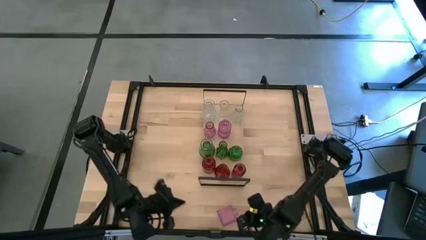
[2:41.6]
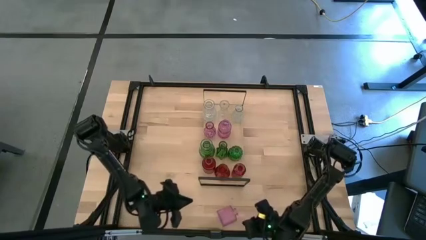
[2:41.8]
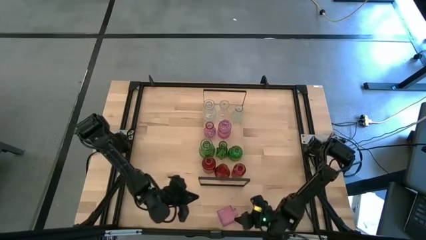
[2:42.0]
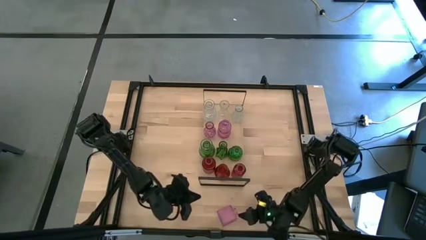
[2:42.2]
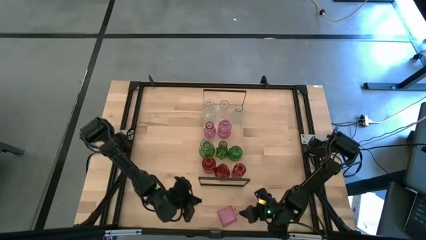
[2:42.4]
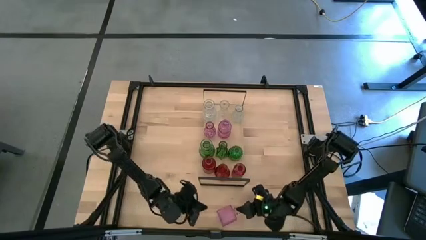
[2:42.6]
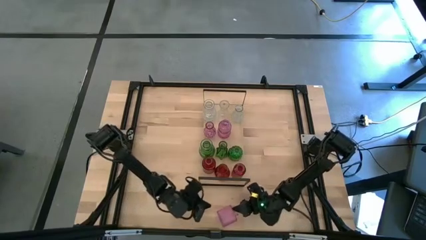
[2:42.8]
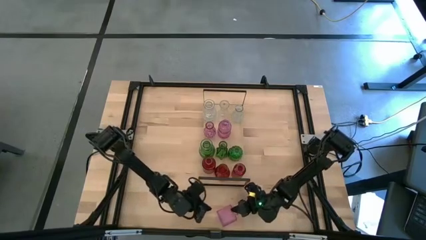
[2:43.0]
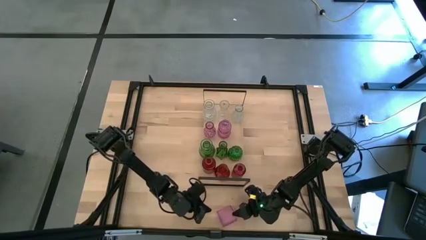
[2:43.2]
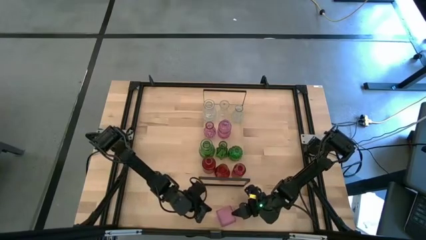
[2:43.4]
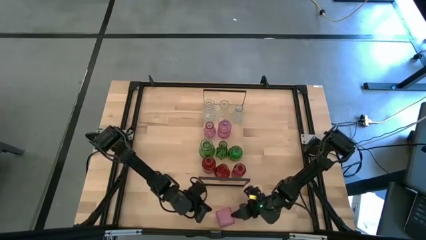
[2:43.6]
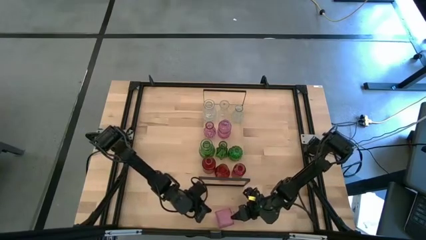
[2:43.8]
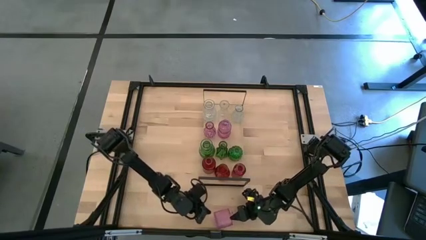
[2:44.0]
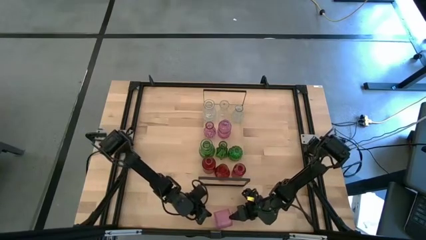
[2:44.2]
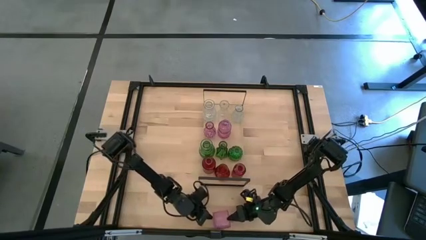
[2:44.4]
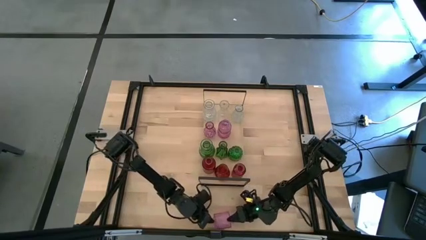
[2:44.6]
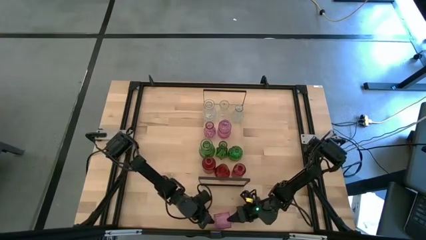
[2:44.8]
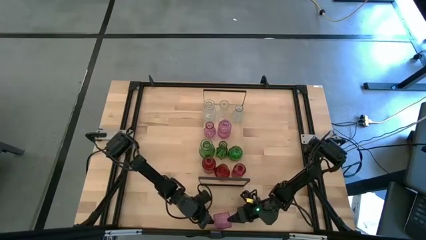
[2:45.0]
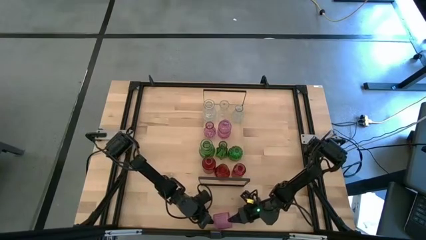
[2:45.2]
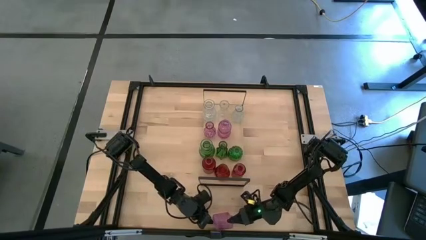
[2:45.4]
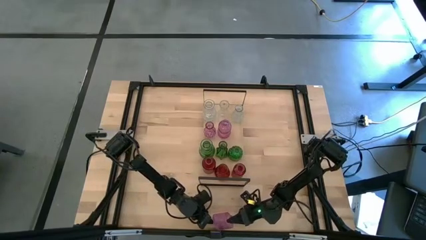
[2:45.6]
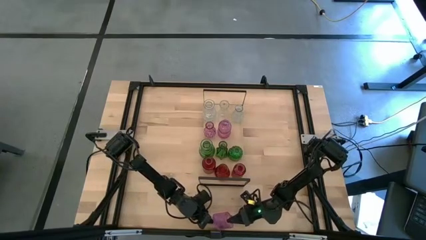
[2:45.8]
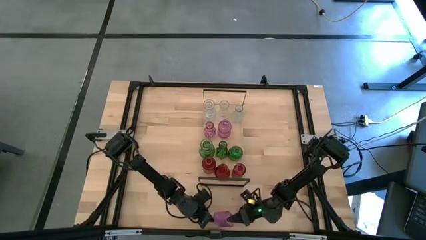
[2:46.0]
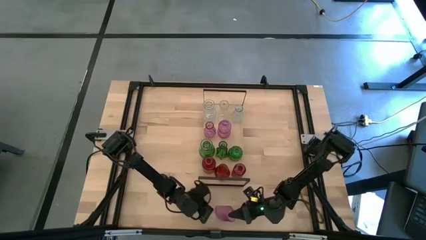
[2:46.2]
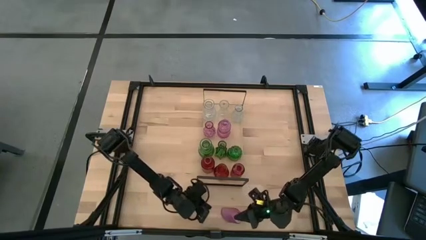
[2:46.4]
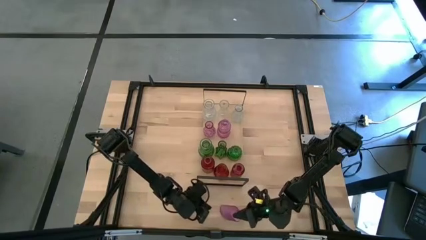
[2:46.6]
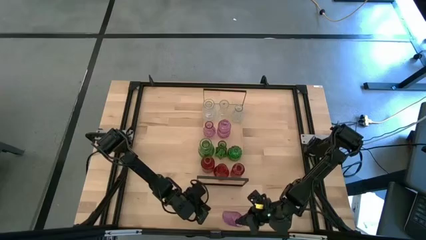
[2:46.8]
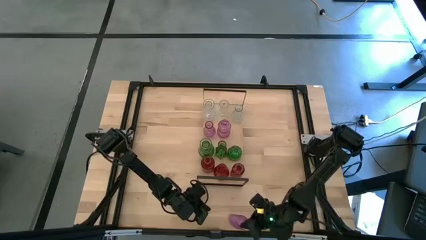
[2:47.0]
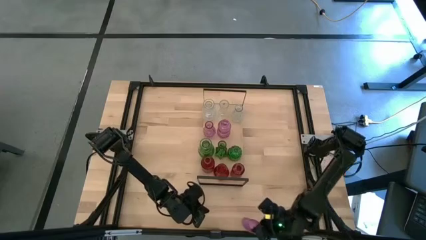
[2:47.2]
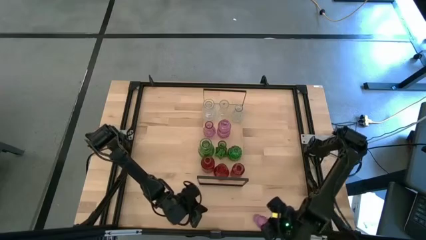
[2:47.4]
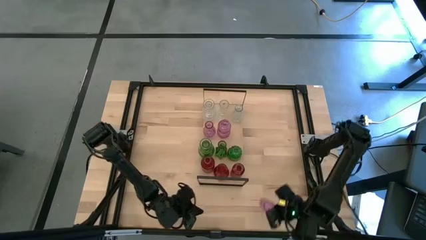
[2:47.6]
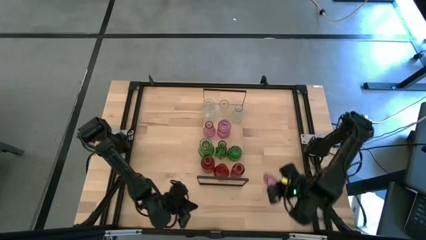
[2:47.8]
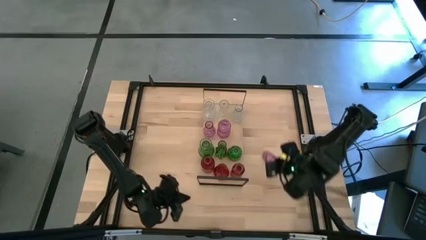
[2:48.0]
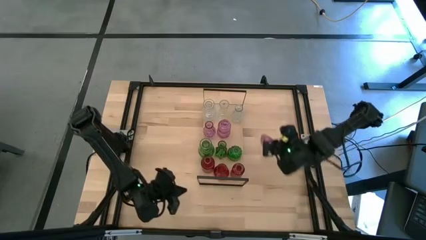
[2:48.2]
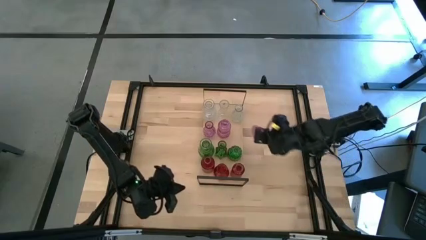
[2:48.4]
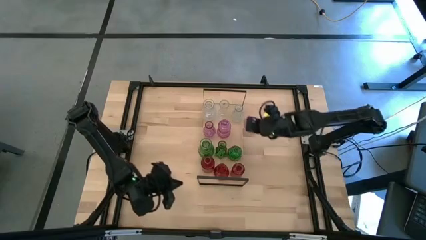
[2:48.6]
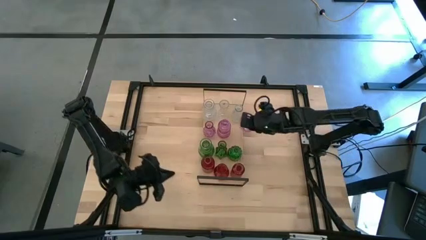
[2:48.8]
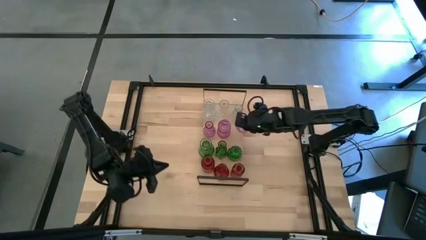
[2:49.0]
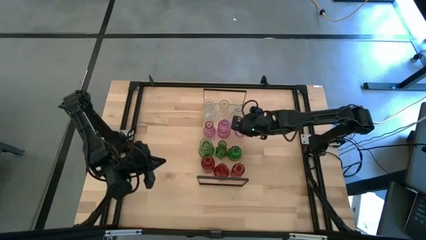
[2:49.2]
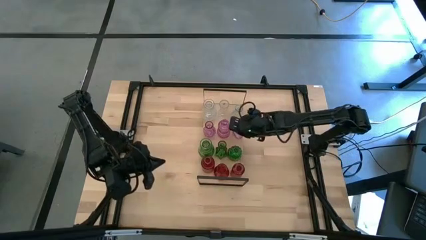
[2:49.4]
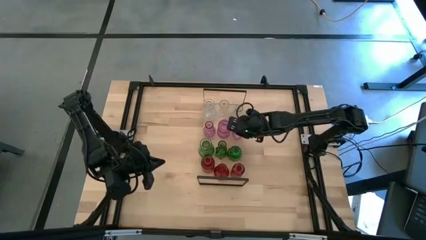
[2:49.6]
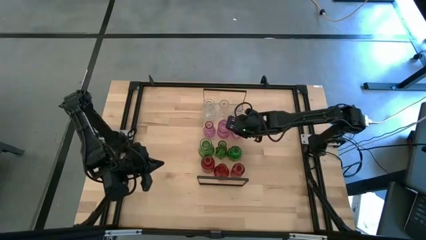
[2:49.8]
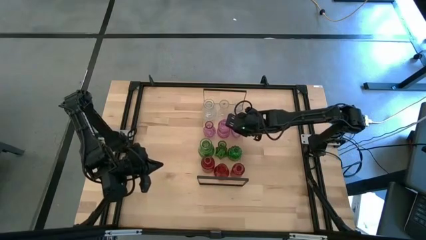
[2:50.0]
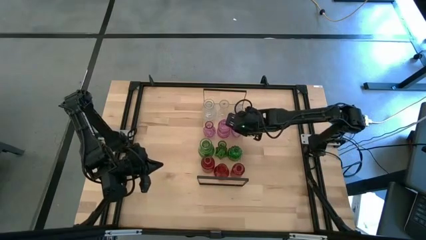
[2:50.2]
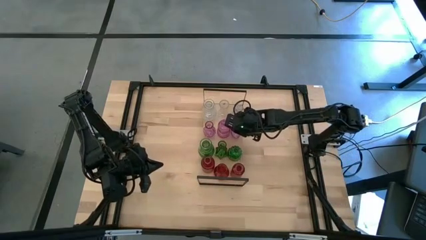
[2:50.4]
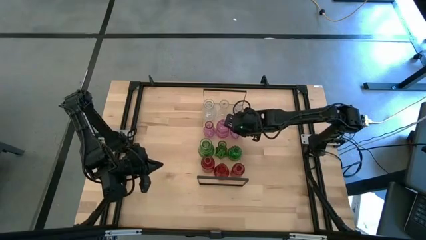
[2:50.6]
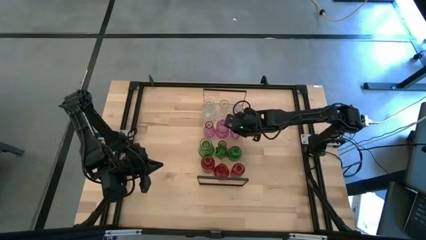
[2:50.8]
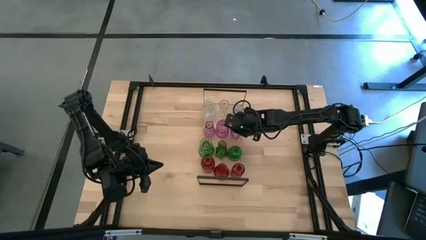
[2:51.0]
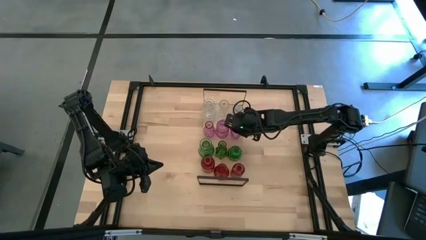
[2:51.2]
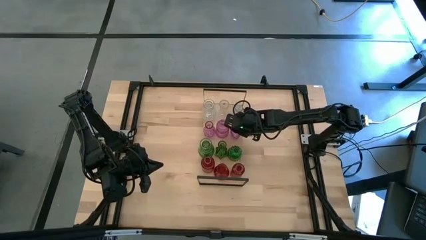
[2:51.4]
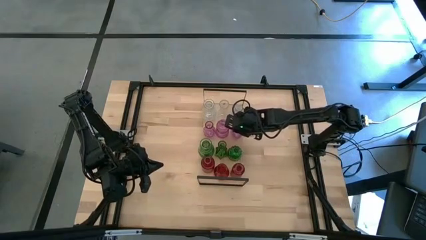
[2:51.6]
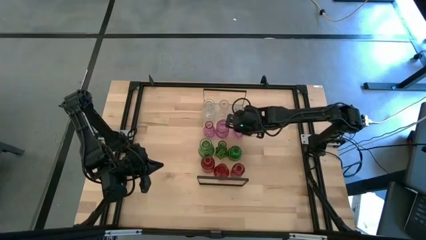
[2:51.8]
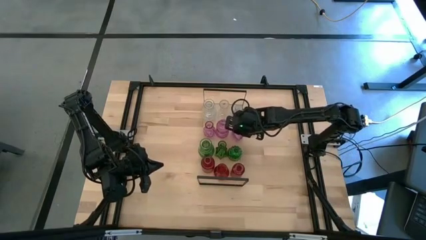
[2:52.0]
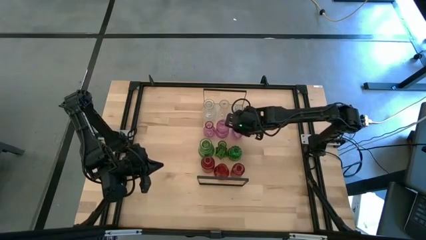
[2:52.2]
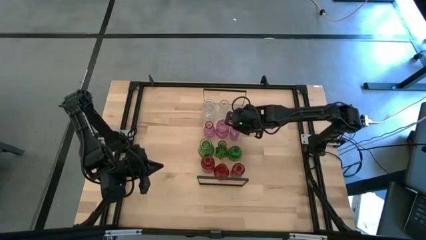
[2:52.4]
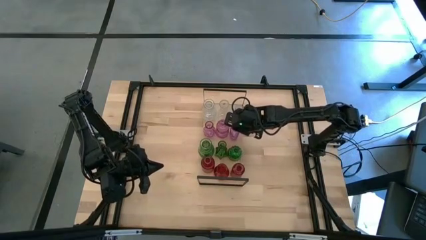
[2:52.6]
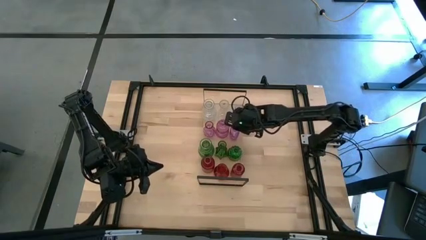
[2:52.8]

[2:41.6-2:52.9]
Task: sort vases onto shelf
Put the purple vase on the shelf aligned with the other purple vases

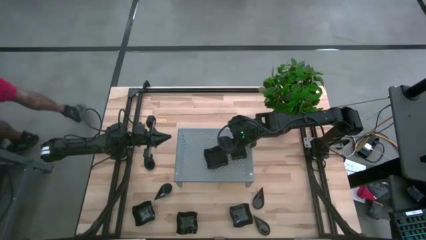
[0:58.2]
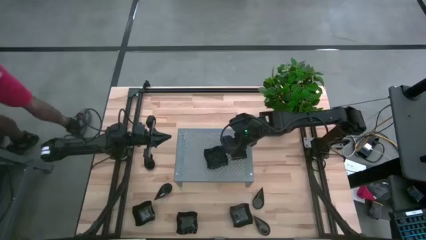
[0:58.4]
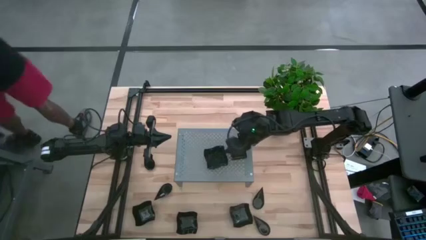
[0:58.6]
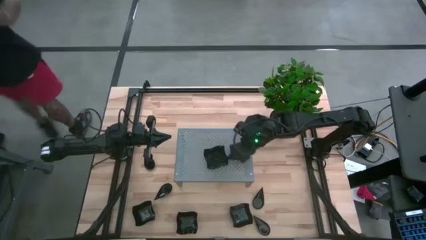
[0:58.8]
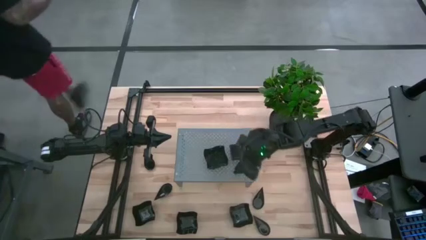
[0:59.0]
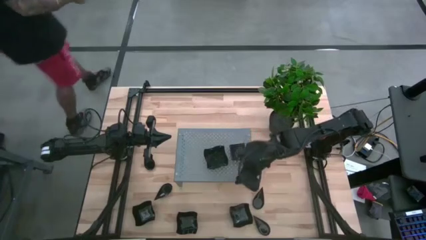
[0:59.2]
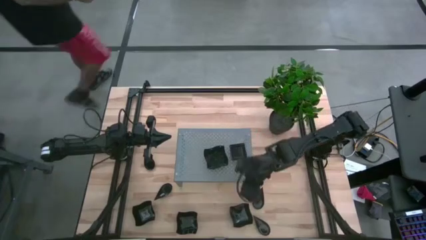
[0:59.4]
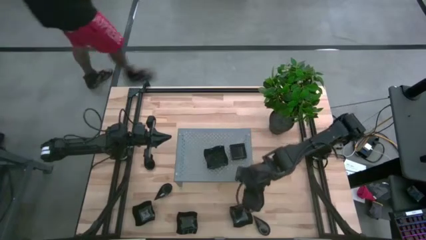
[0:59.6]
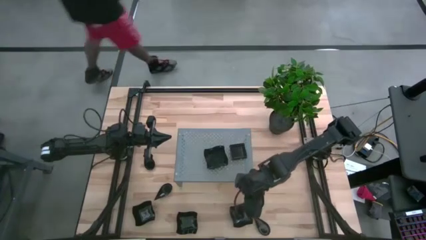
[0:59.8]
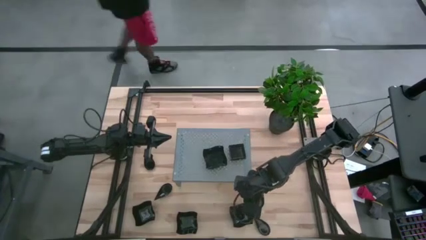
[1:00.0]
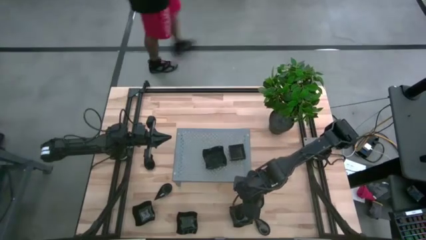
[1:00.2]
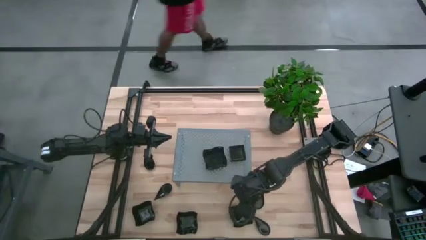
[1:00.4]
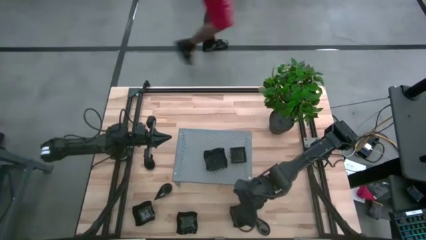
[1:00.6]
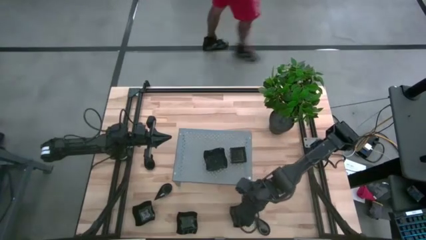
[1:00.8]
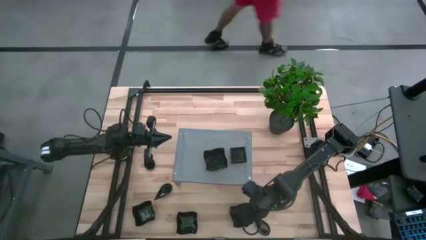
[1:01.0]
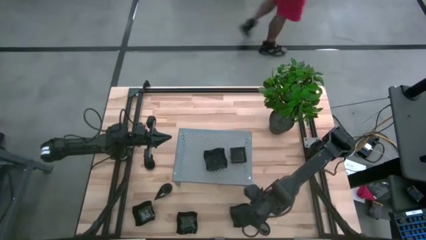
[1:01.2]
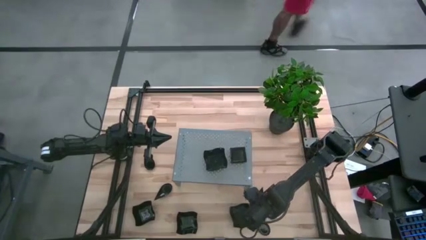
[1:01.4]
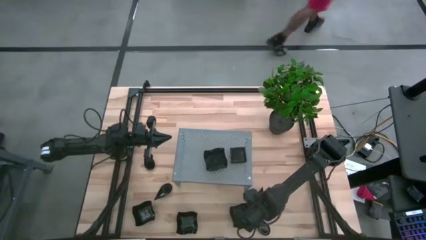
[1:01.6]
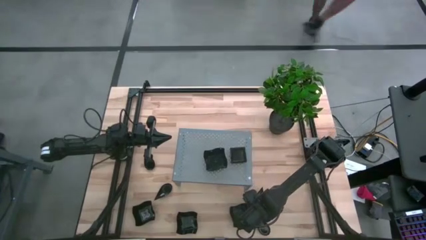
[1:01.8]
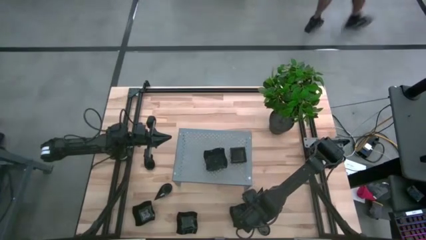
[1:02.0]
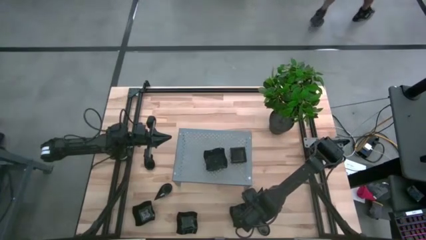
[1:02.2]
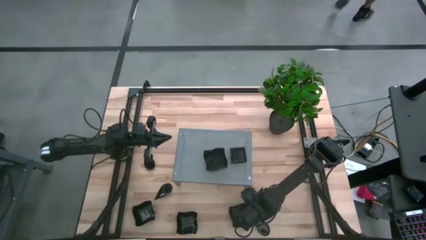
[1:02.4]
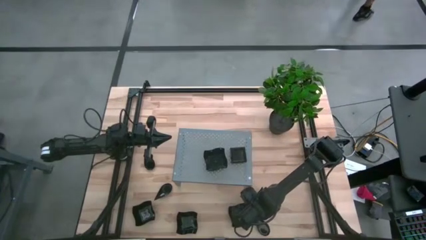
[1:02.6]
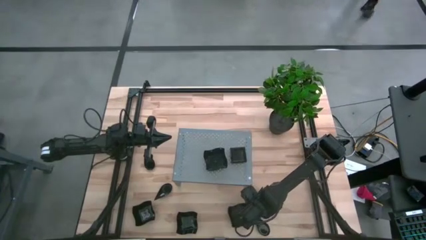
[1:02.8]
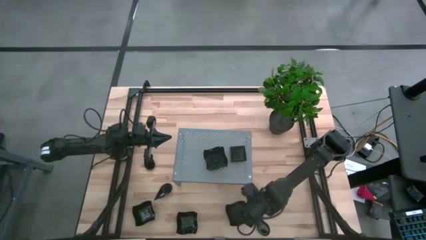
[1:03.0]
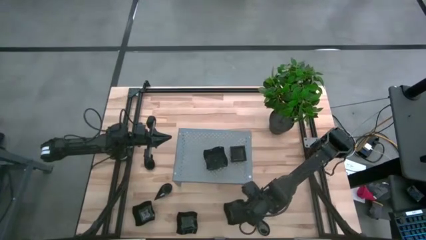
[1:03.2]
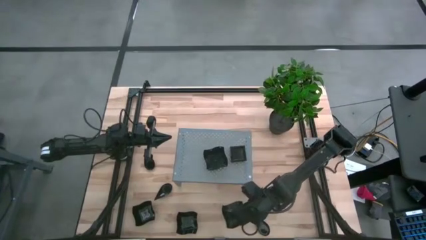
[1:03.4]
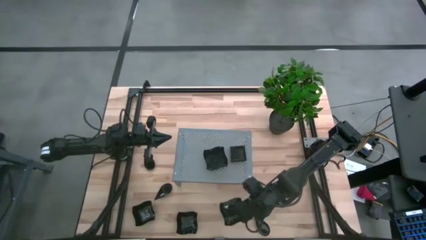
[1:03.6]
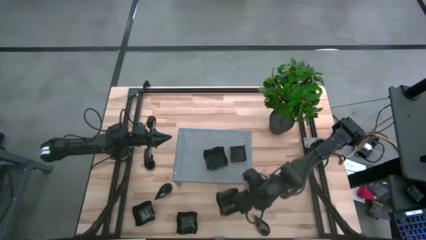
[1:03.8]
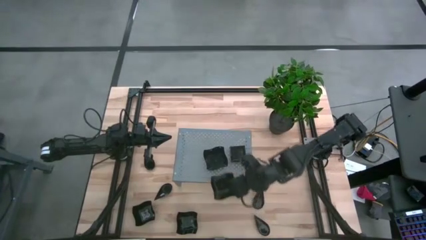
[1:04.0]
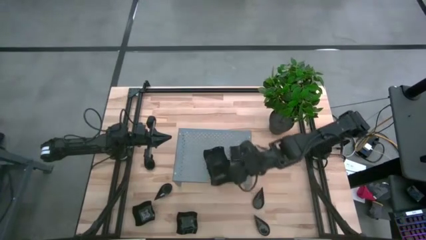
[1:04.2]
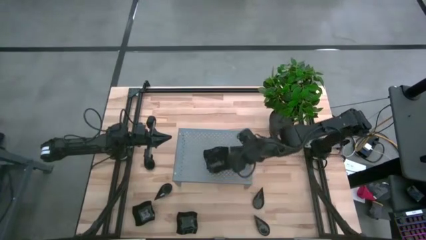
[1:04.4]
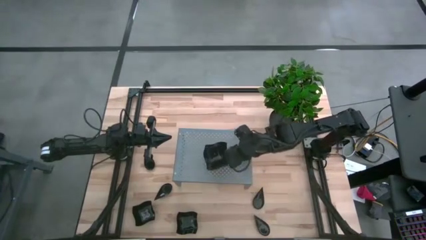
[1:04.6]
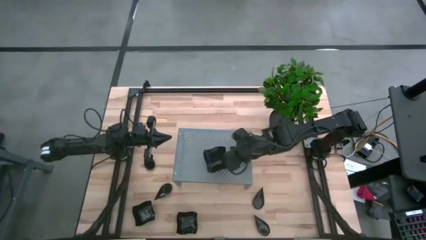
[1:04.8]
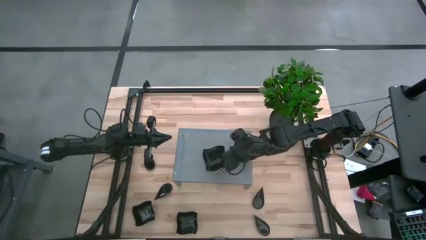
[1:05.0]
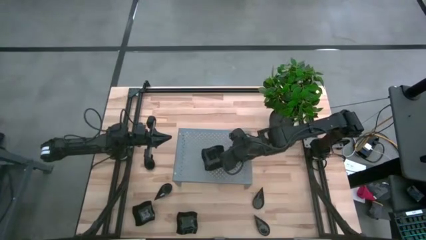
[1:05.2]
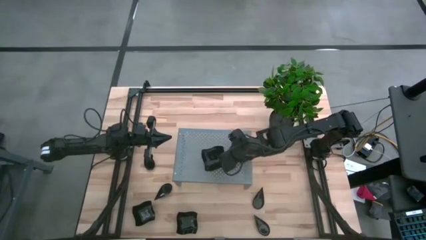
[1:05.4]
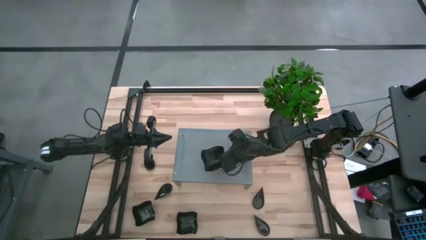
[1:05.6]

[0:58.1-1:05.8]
Task: Pick & Place Mini shaped plates
Stack the black distorted plate on the black distorted plate on the shelf
